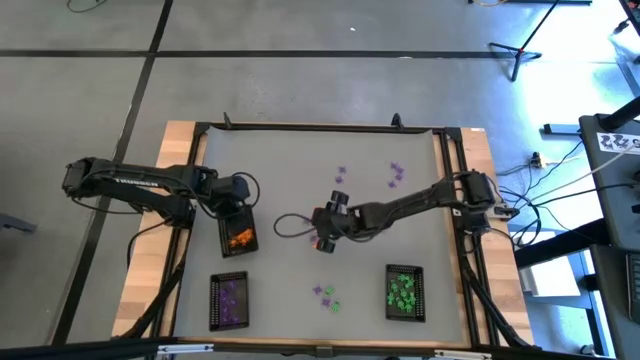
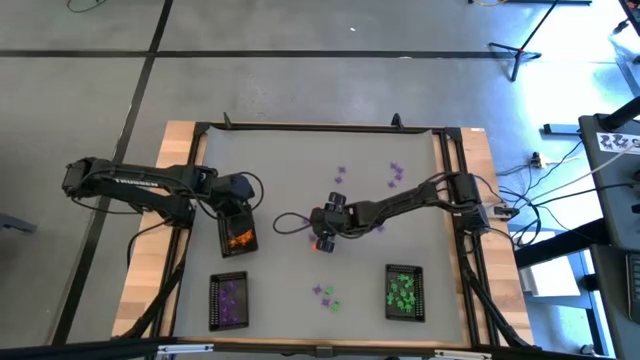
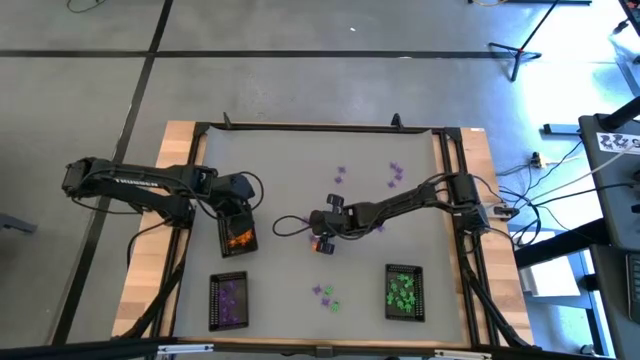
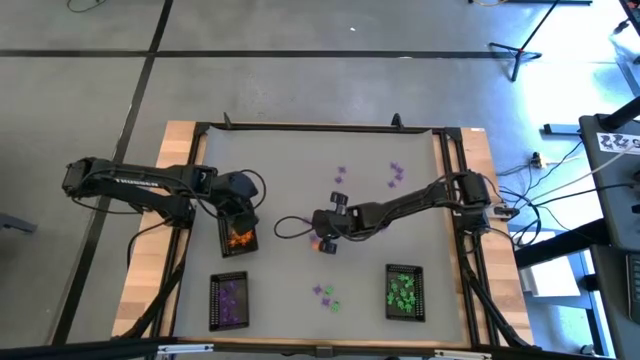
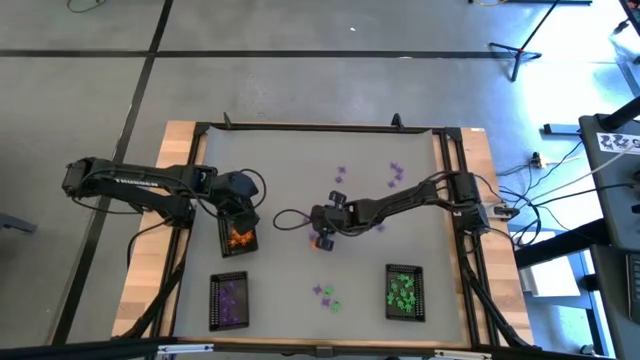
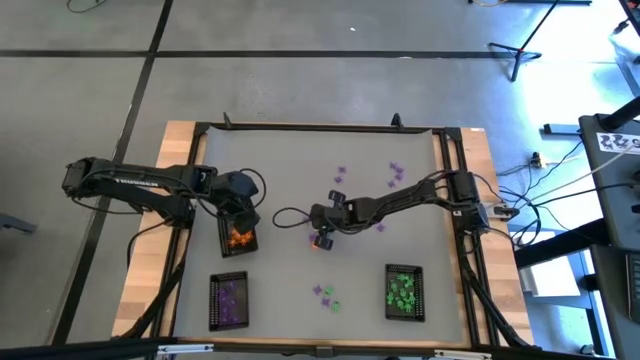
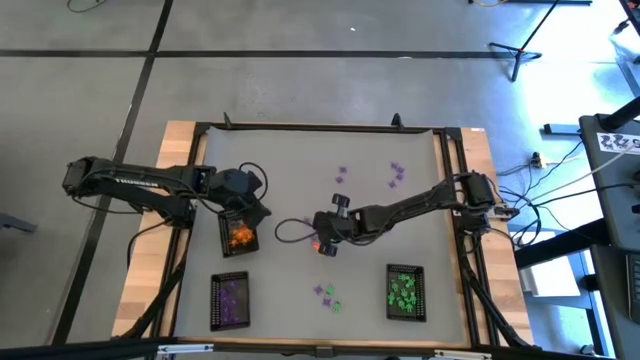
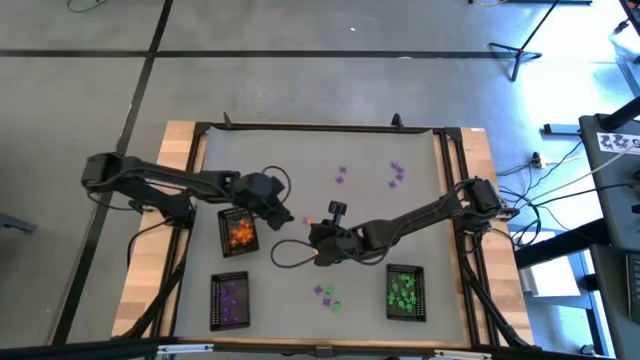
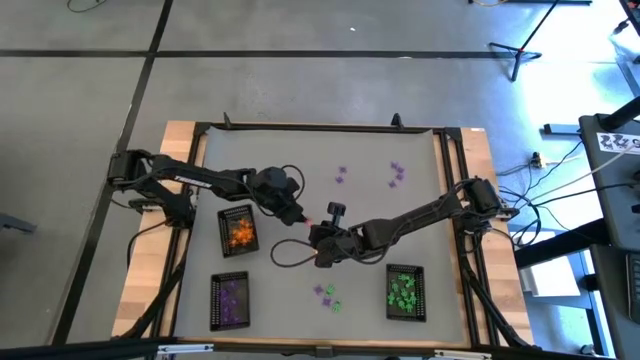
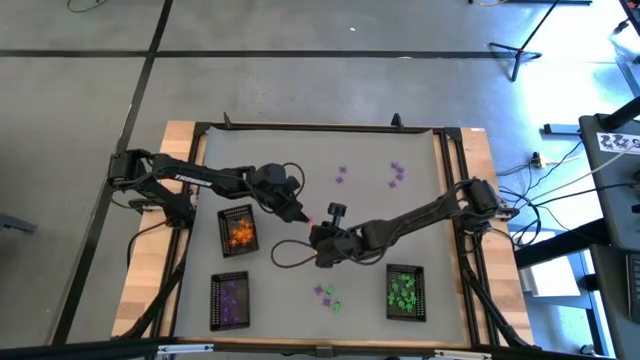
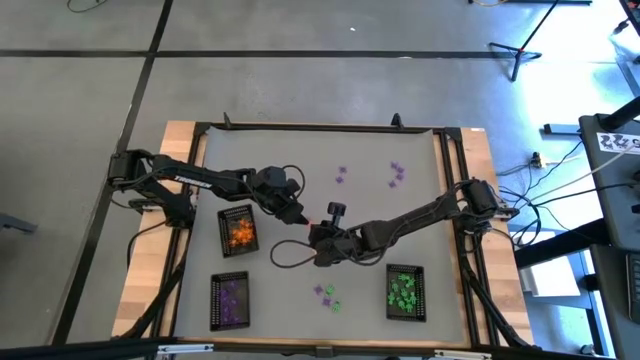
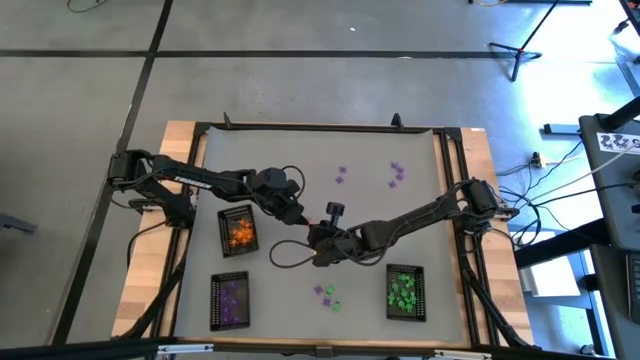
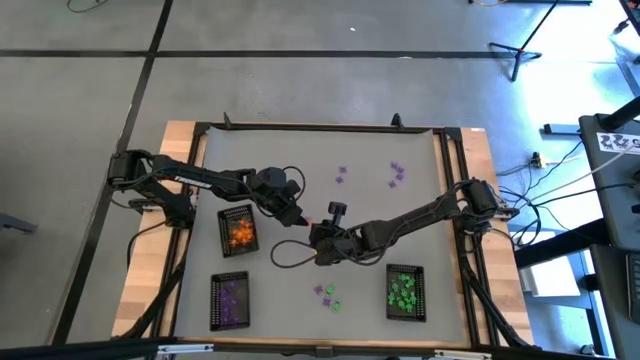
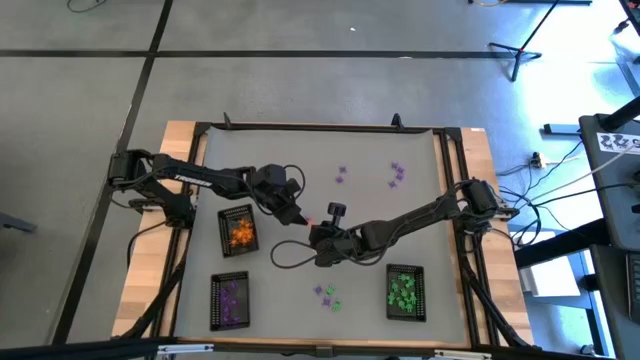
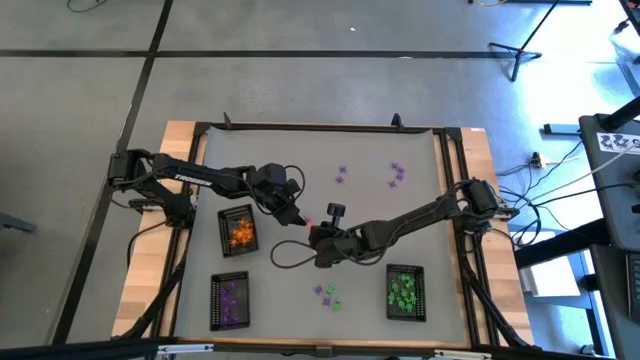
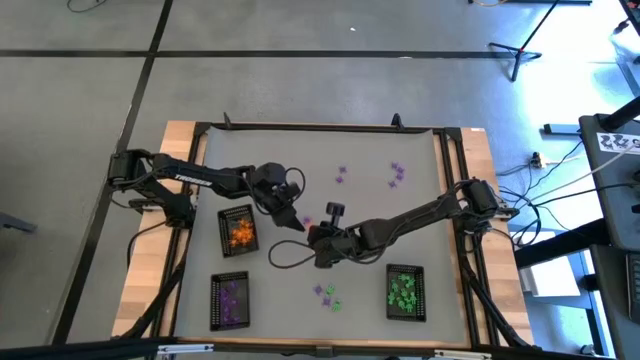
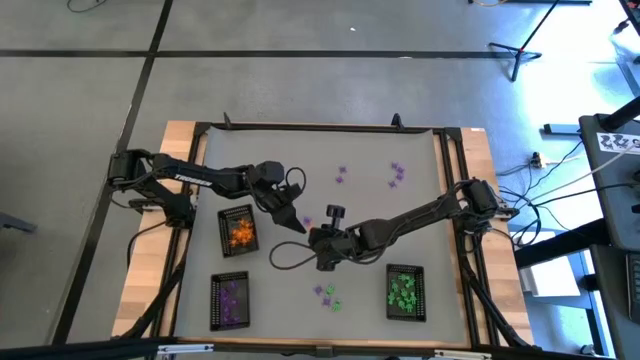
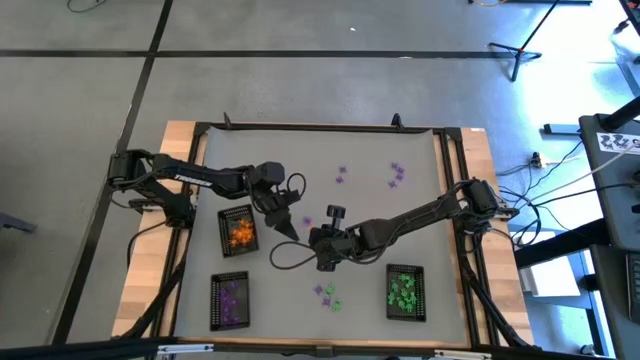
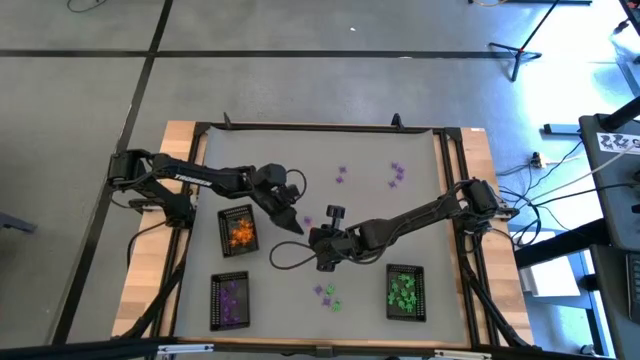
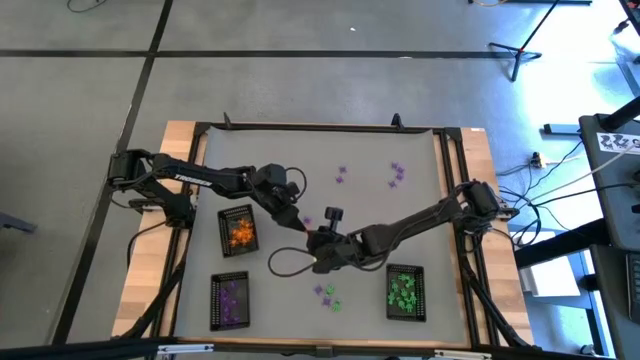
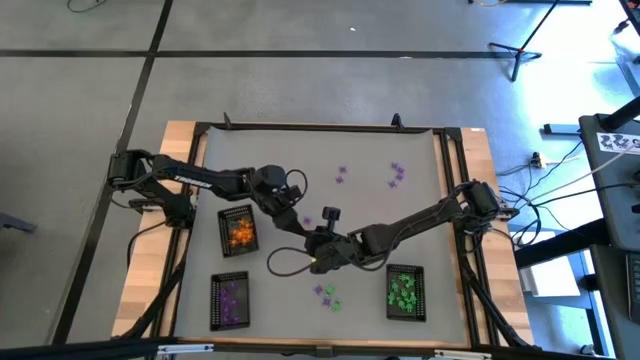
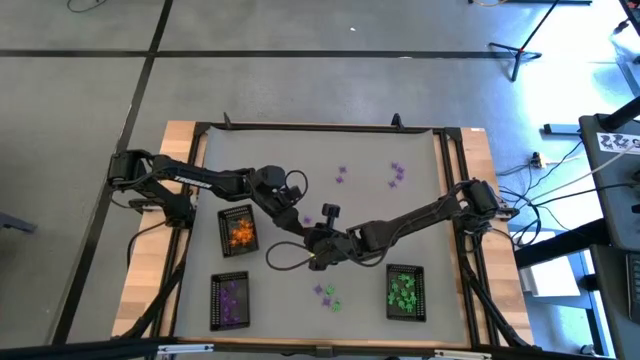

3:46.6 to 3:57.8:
Task: Sort Halloween decoration
Put the orange spider toy into the top black basket

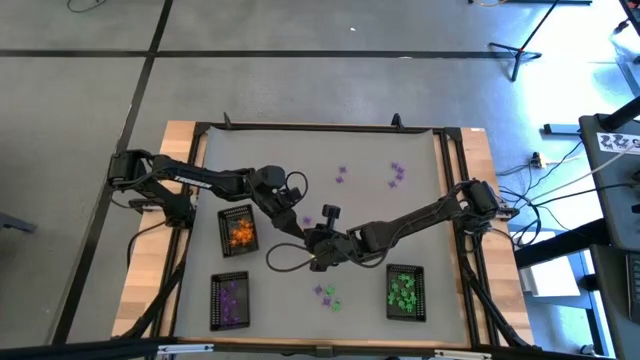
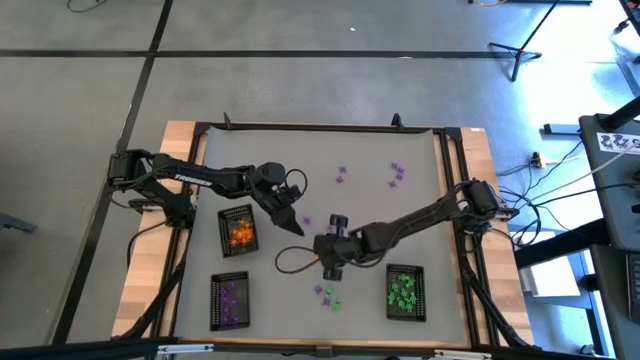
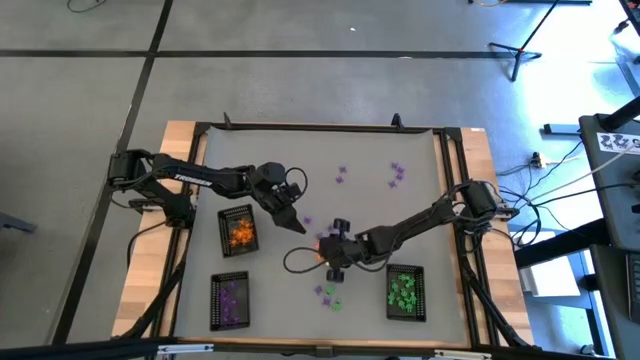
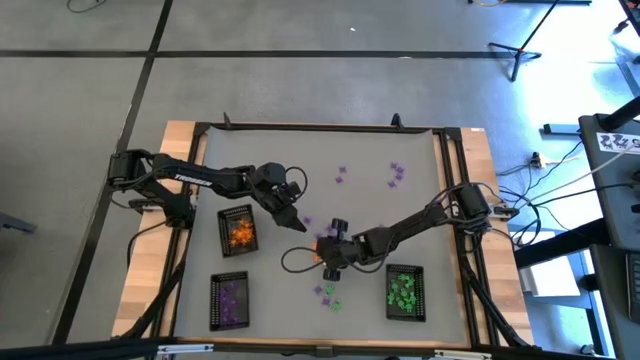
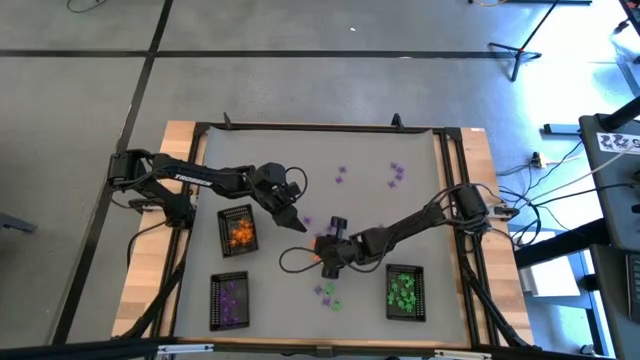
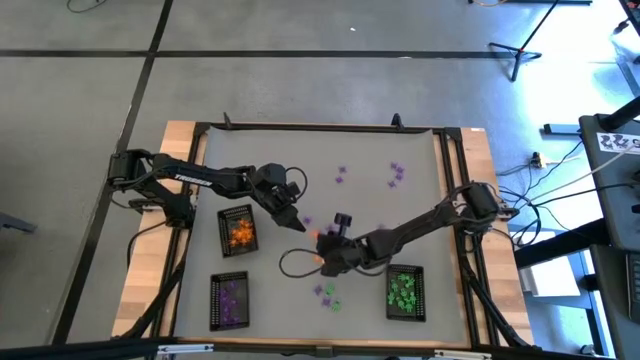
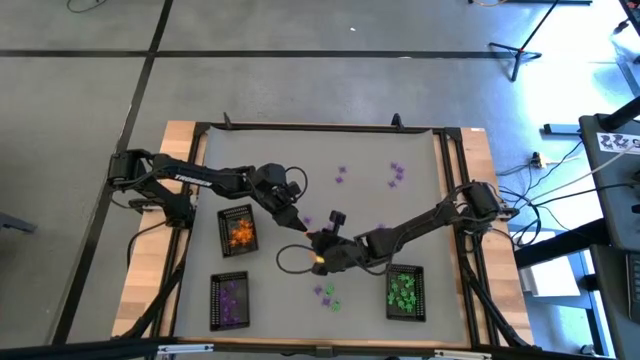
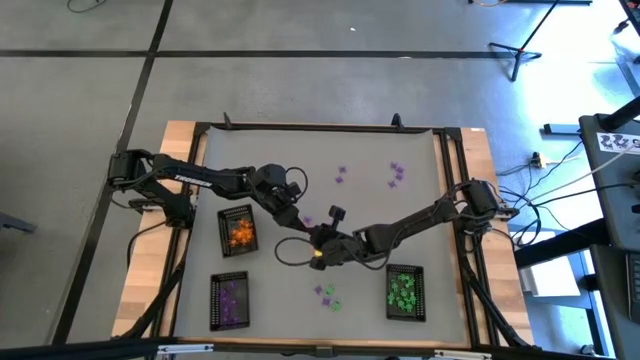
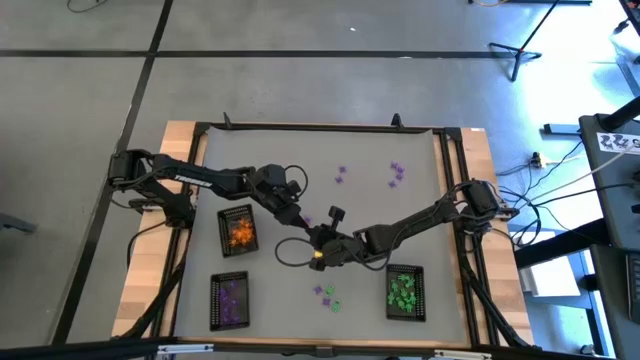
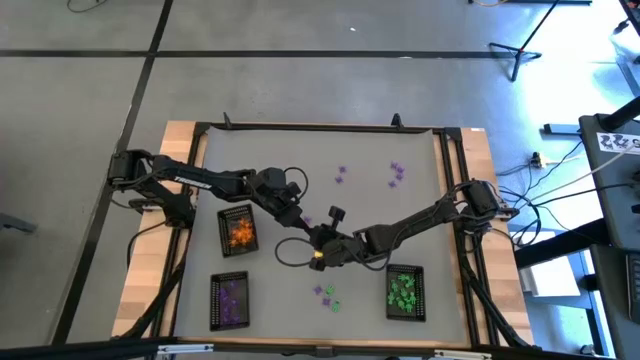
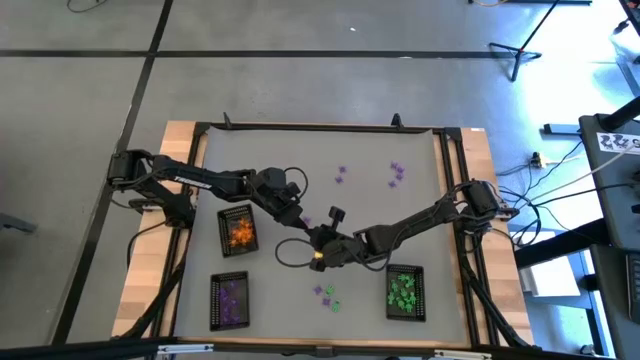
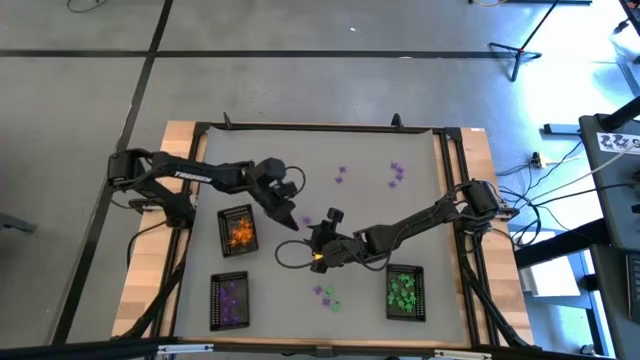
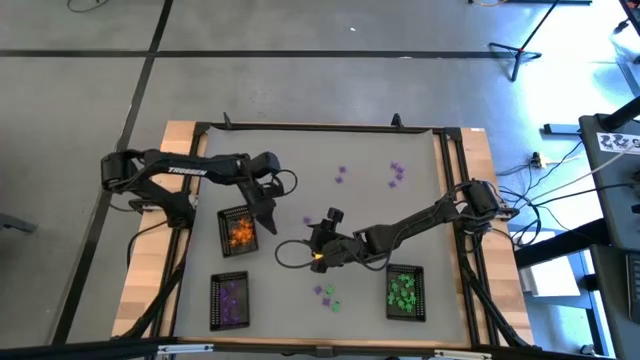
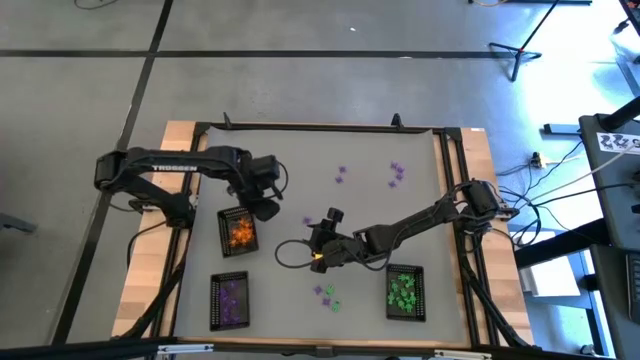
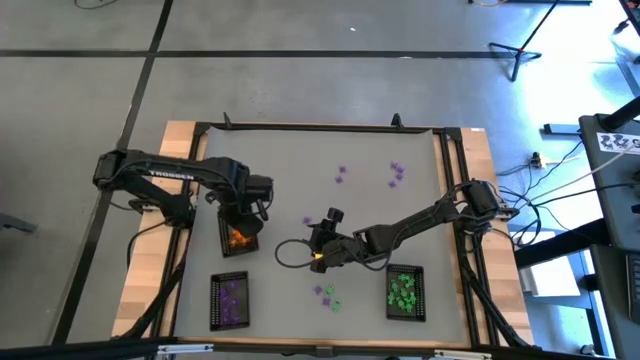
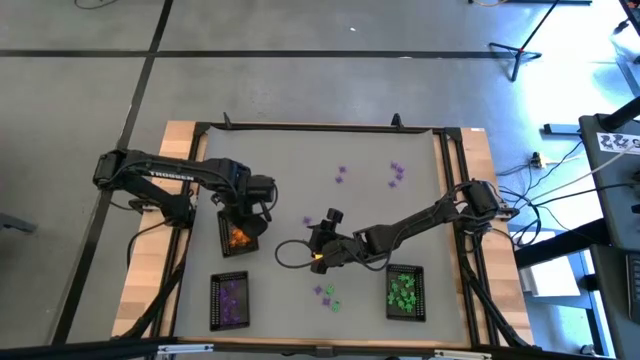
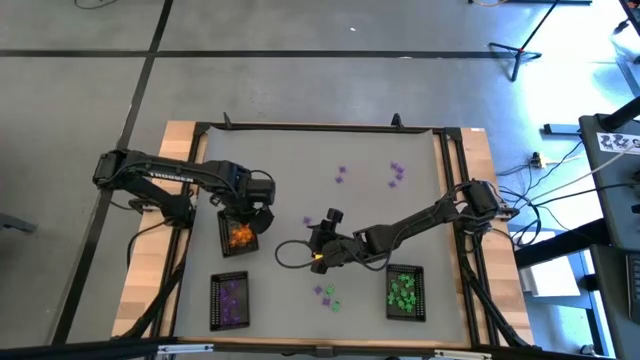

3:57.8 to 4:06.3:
Put the orange spider toy into the top black basket

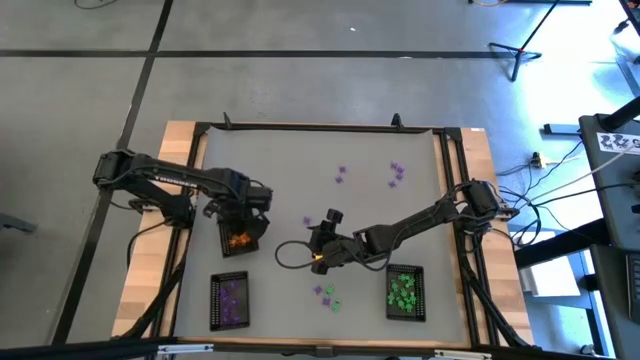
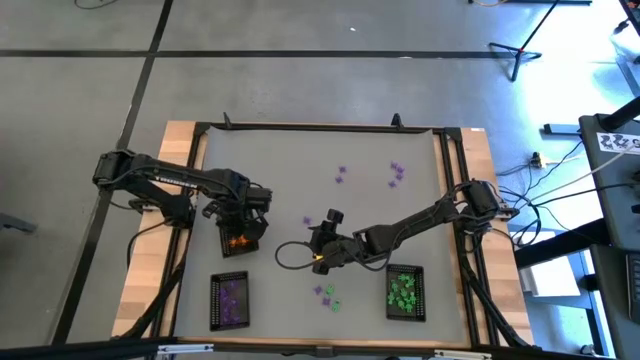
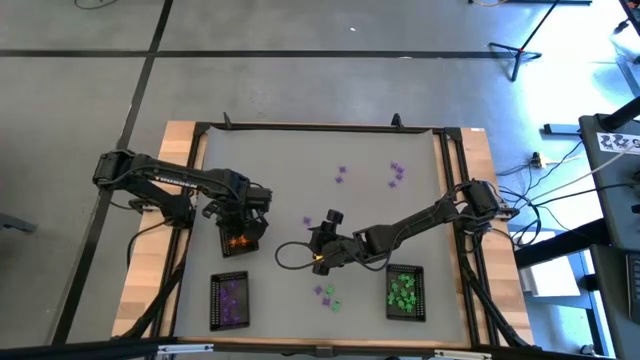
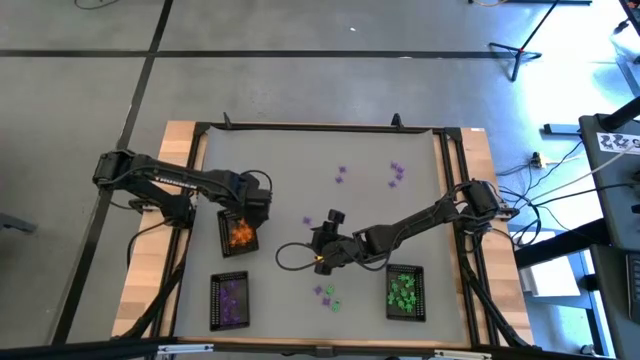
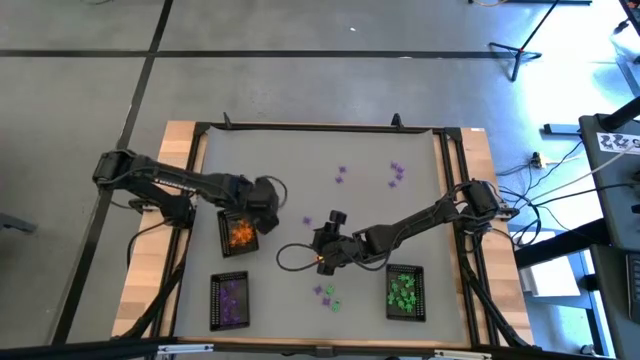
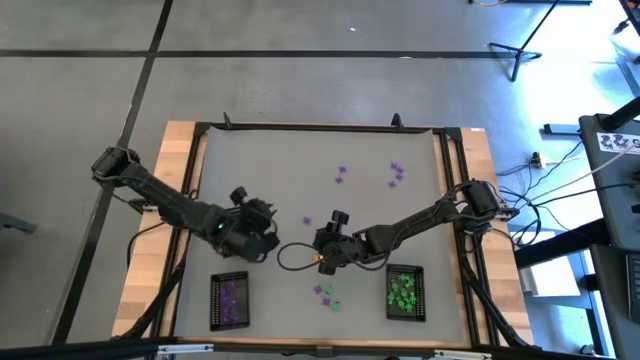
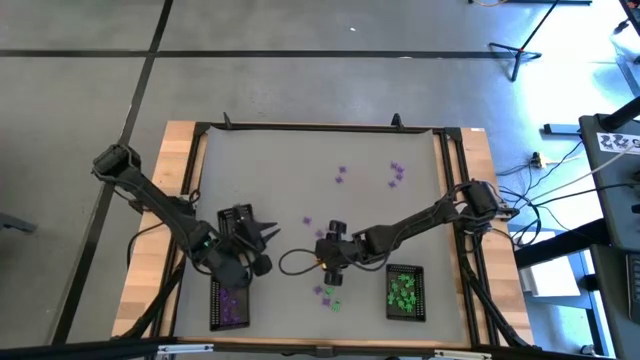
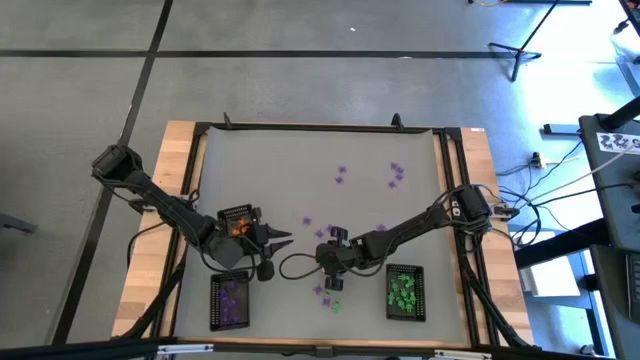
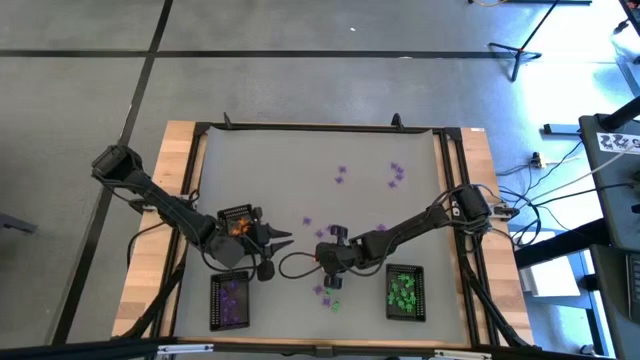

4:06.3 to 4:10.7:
Put the orange spider toy into the top black basket
